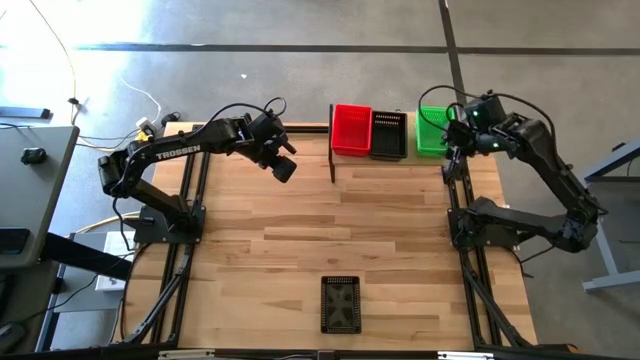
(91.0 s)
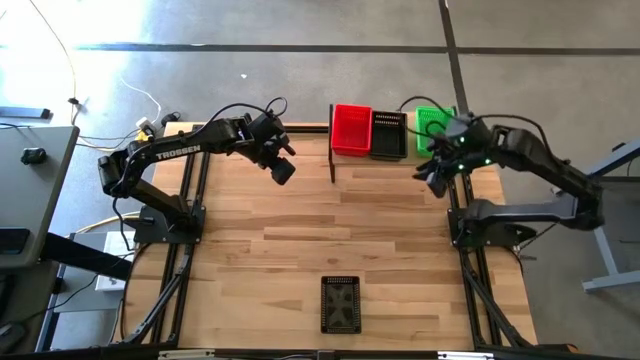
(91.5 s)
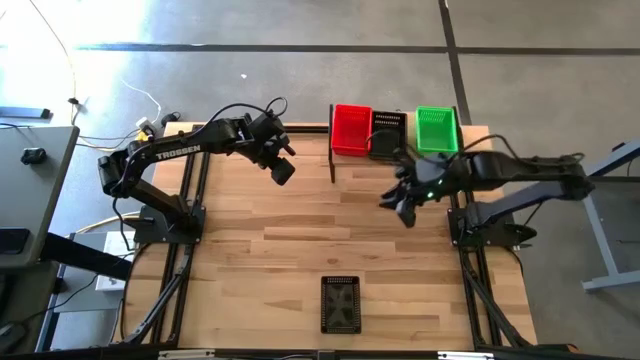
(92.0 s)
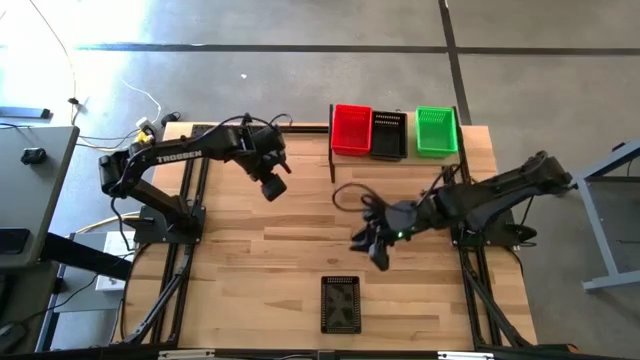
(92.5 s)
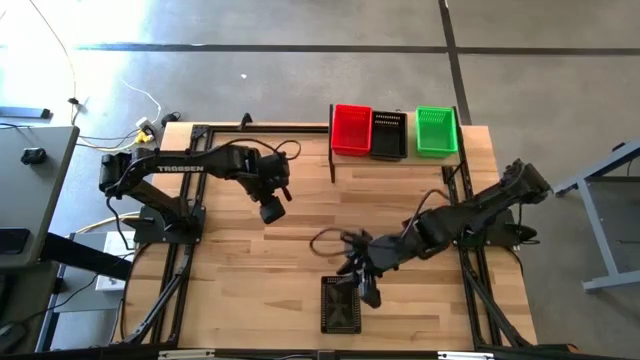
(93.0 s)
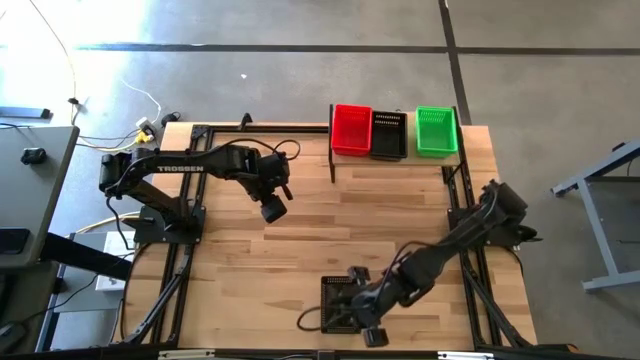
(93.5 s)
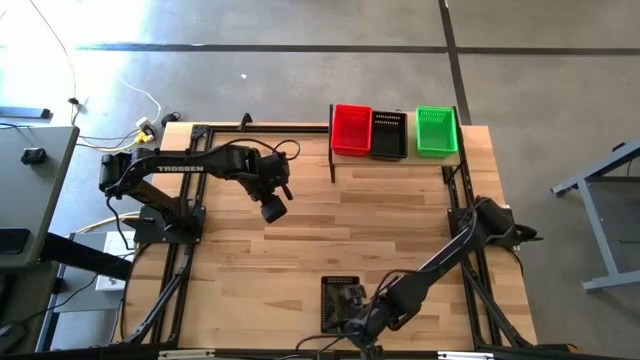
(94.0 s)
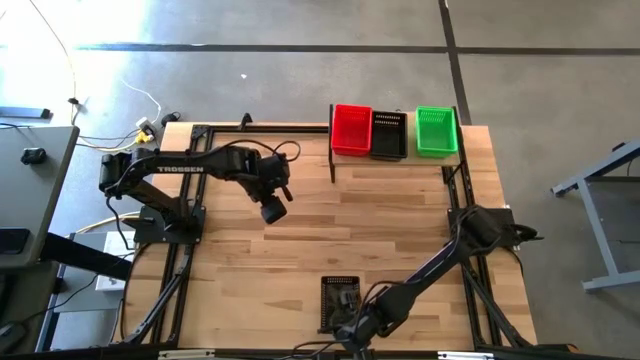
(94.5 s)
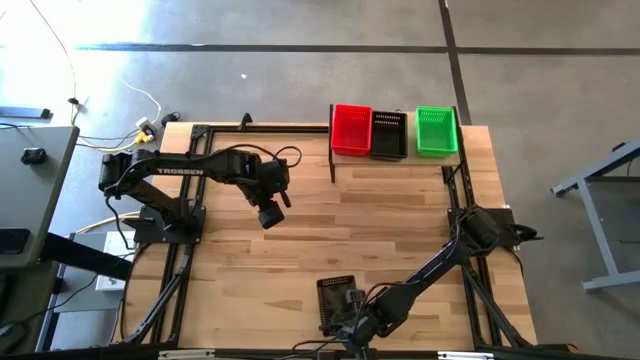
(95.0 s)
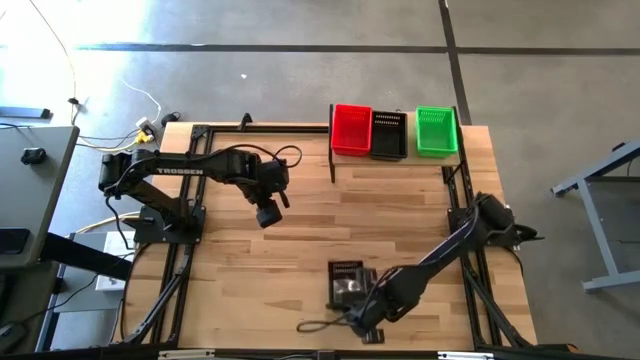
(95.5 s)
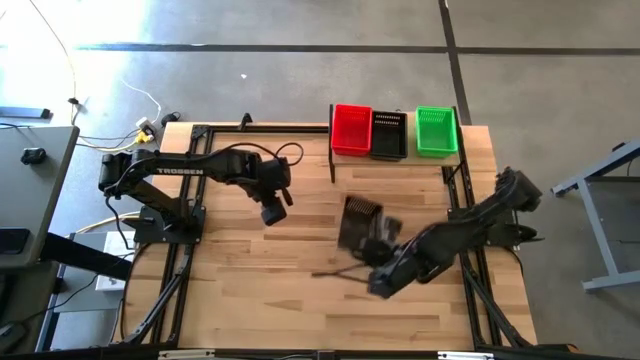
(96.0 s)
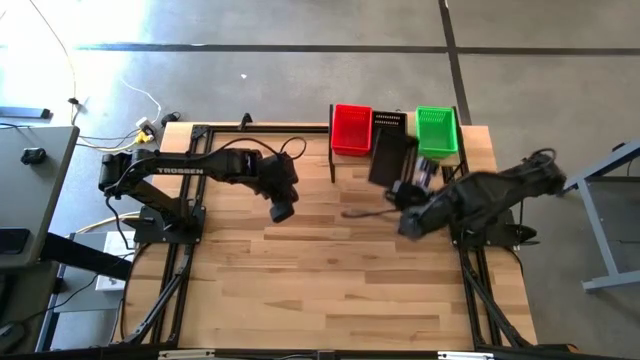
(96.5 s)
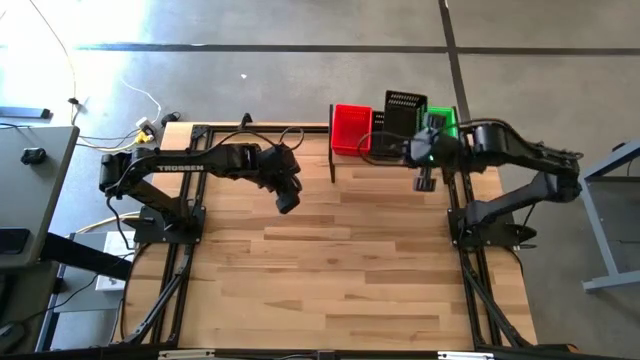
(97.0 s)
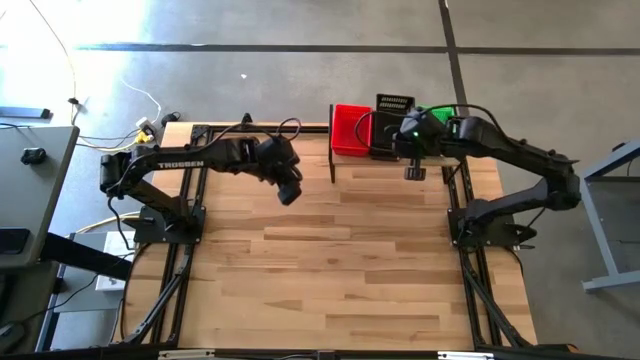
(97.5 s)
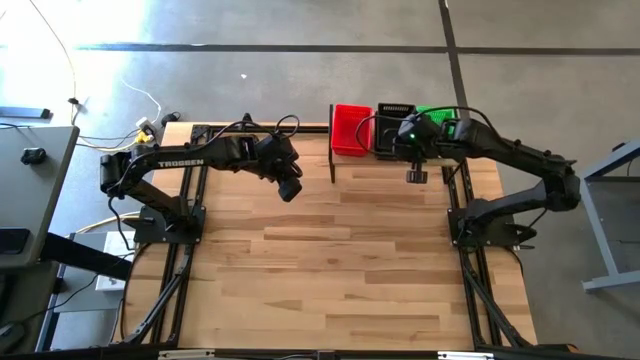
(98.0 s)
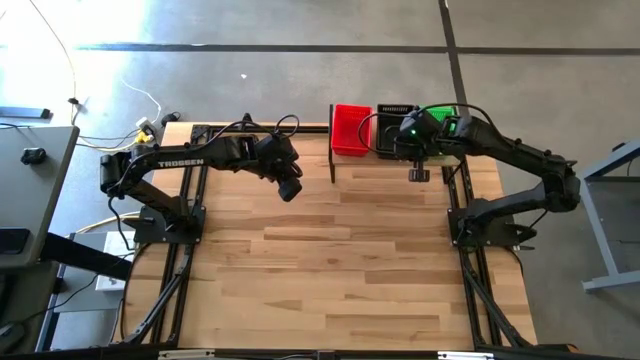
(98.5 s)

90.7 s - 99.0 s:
Task: Stack baskets on shelf by color
Stack the black bin on top of the black bin on the shelf

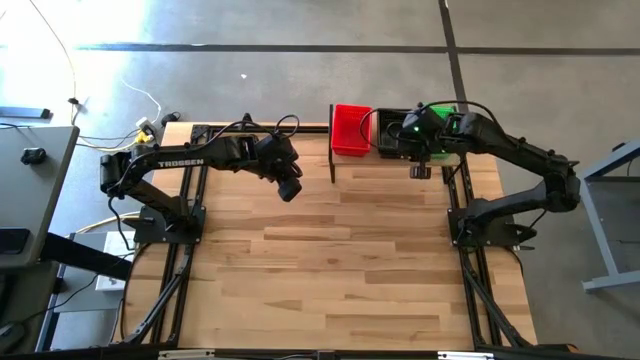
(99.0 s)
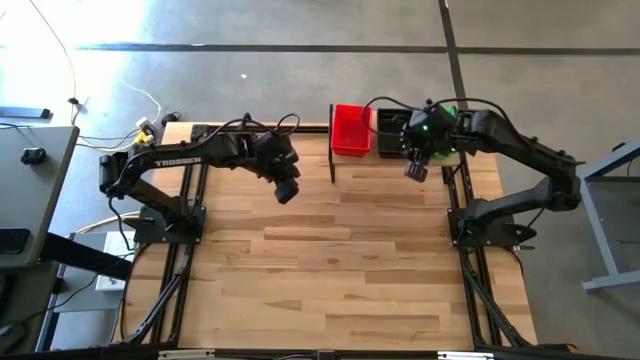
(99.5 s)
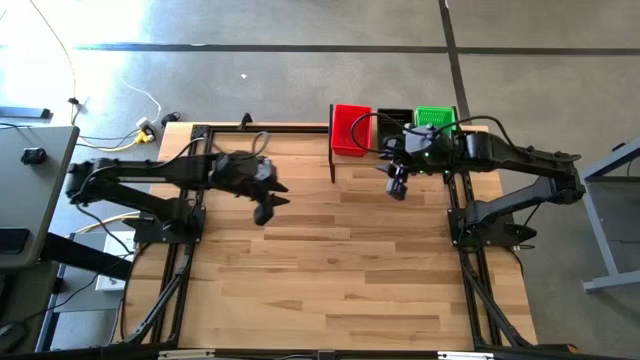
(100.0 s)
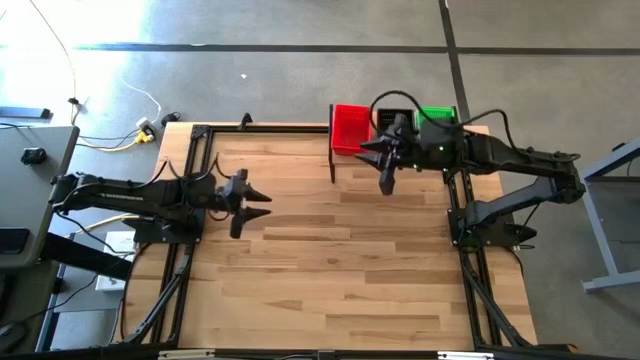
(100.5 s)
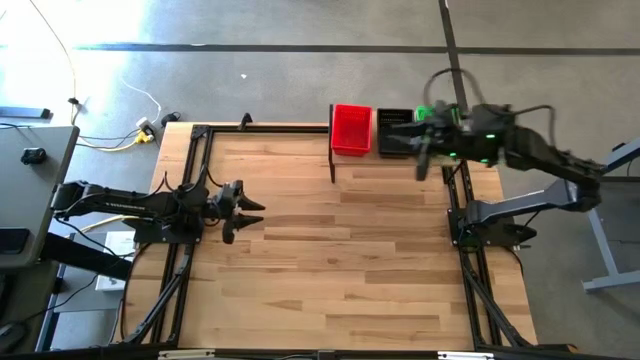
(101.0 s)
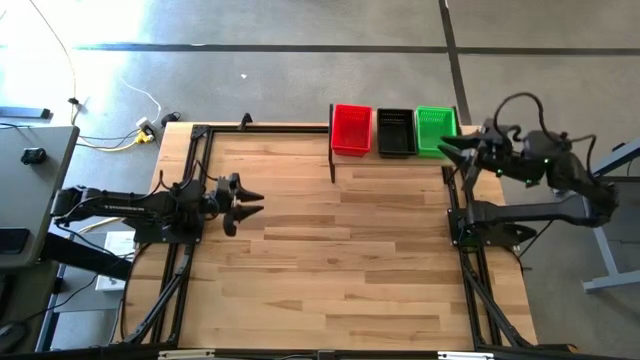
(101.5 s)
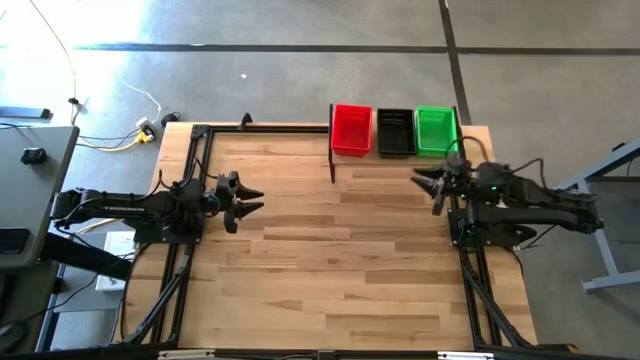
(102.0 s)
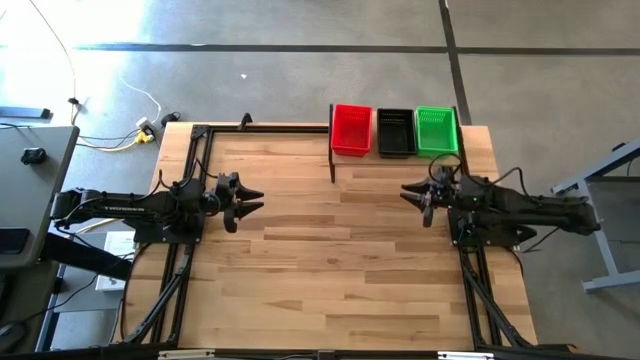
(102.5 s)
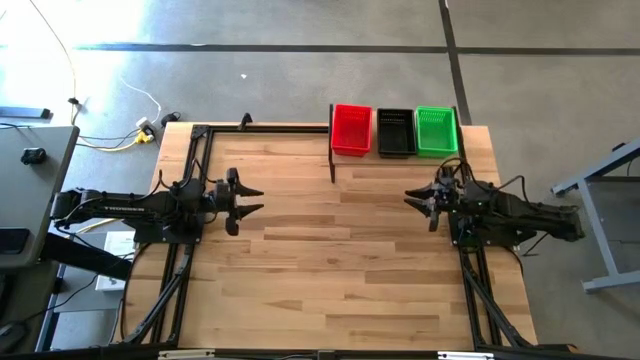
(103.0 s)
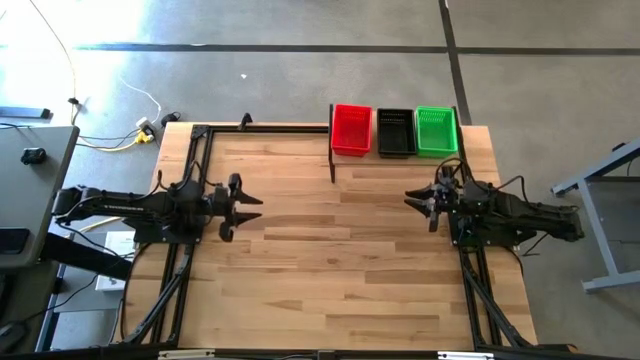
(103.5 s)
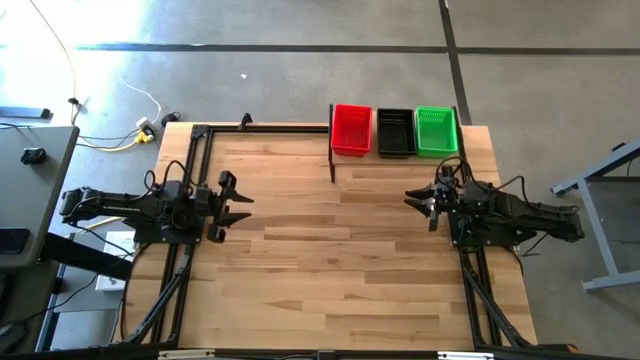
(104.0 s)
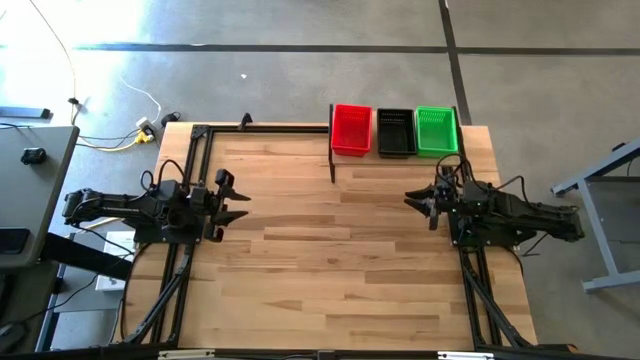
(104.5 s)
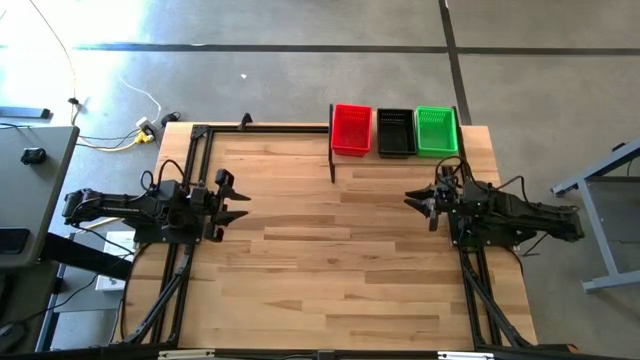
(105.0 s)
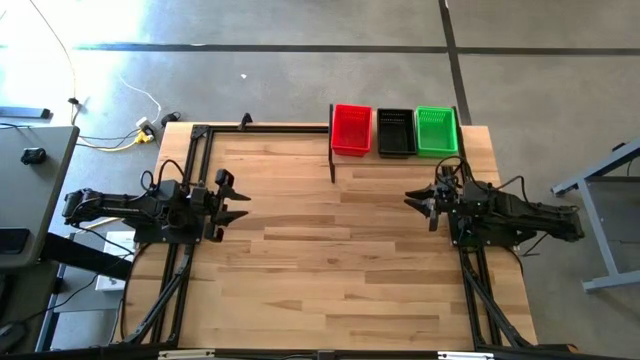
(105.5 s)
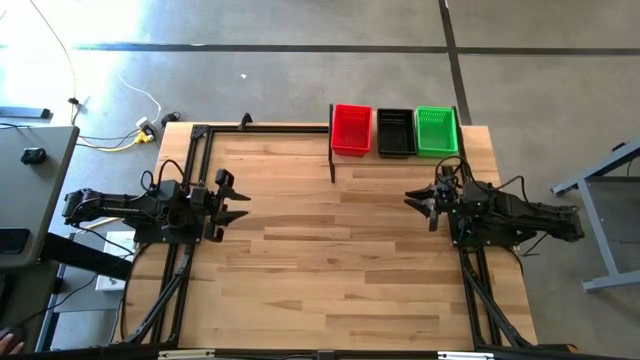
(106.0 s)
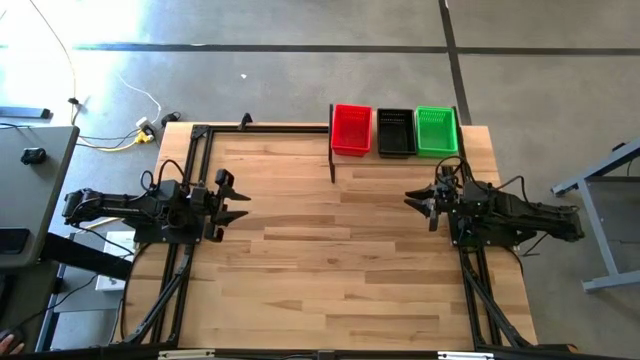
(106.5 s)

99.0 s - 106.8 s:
Return to Home Position

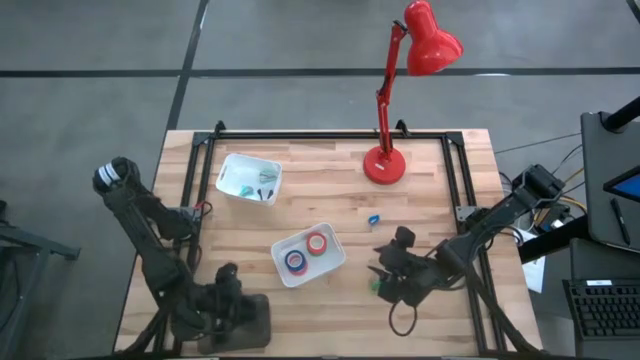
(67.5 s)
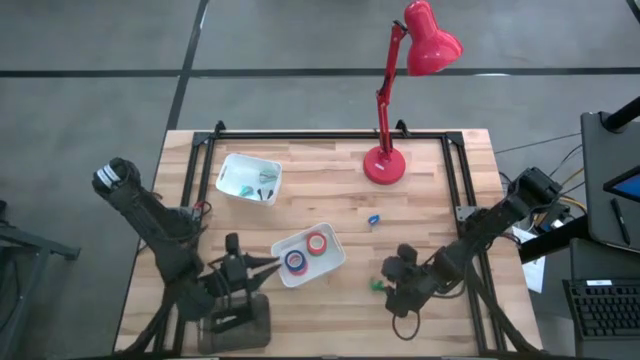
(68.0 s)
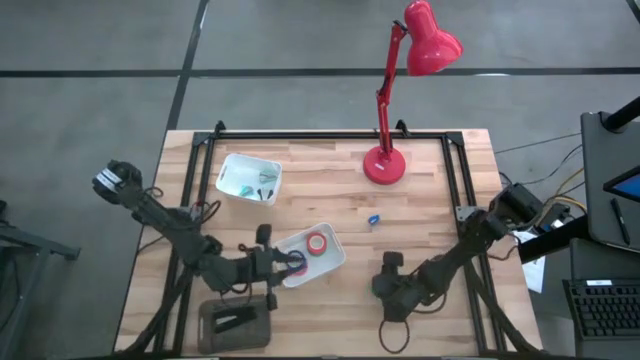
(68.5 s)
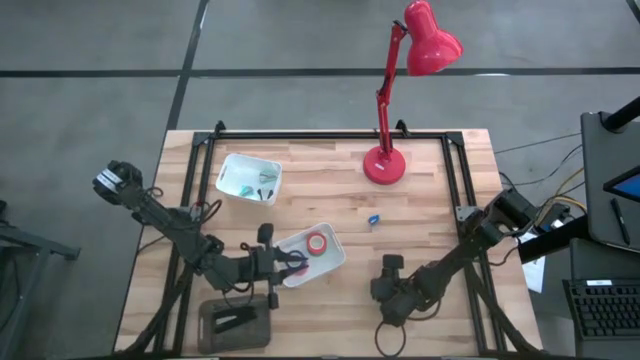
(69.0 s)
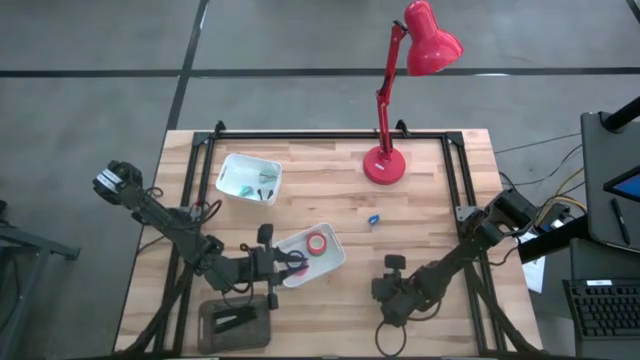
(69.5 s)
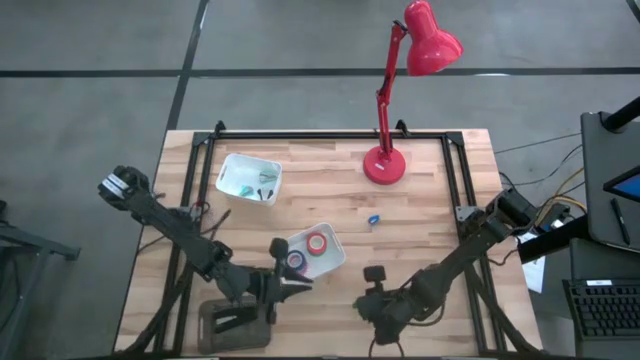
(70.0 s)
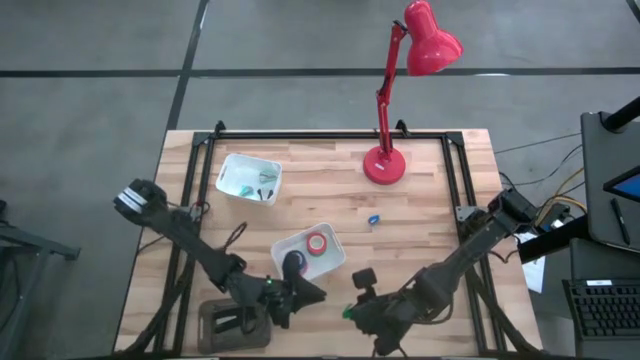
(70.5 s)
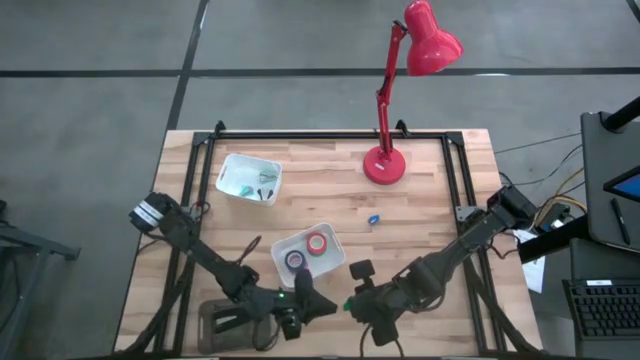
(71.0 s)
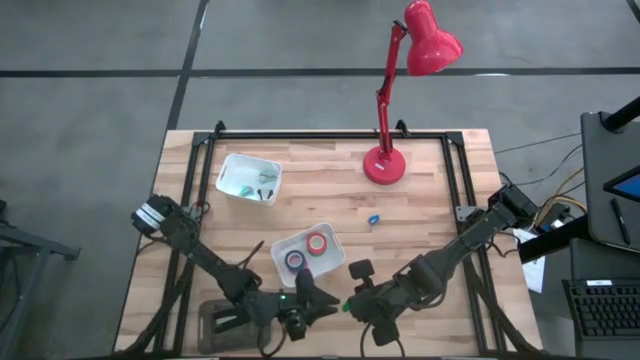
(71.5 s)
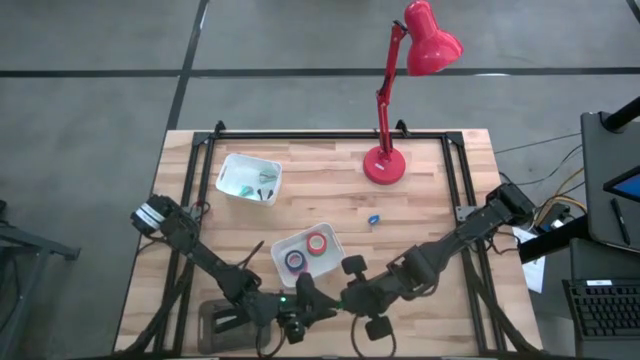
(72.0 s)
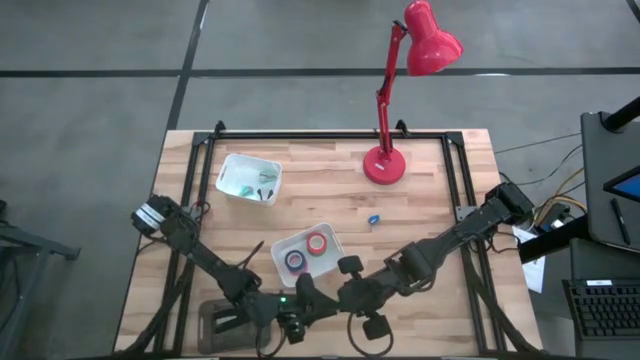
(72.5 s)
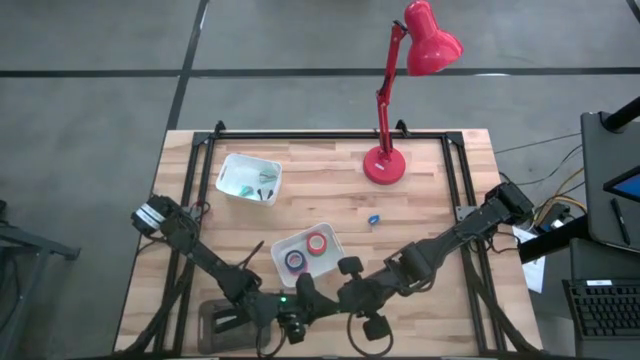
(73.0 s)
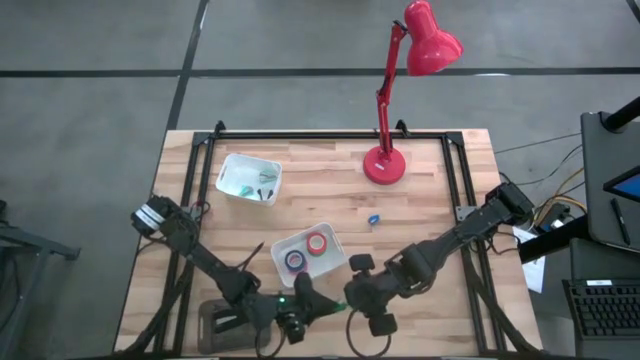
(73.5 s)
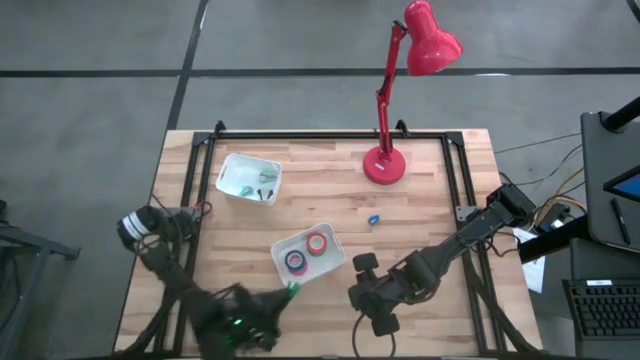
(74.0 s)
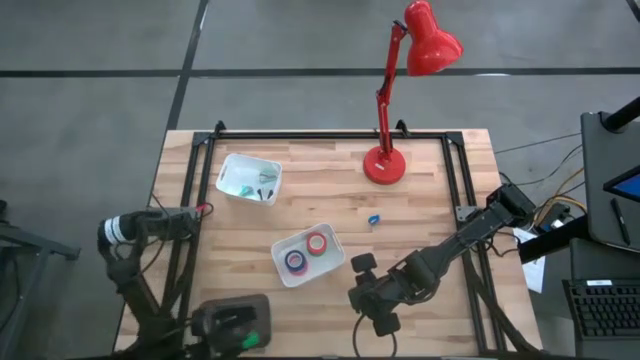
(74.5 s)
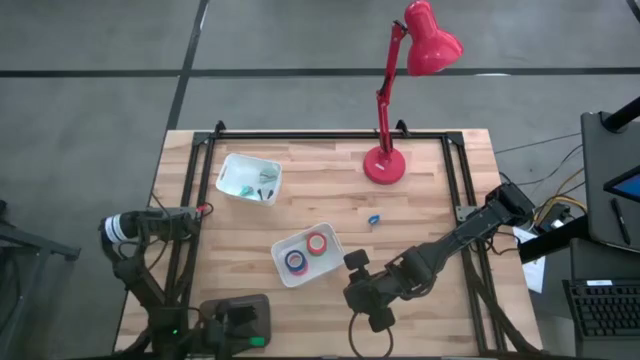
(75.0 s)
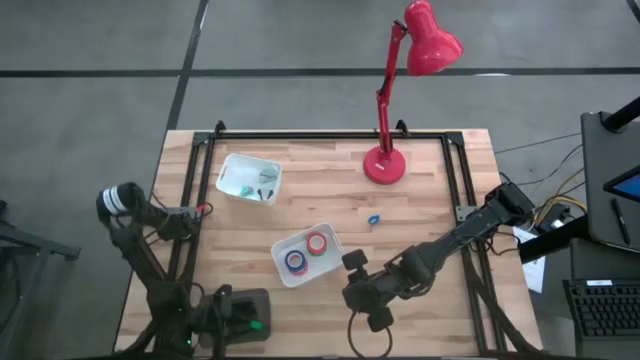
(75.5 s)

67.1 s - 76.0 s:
Task: Pick and place Stapler, Stapler remover, tape
Put the green stapler into the black bin
